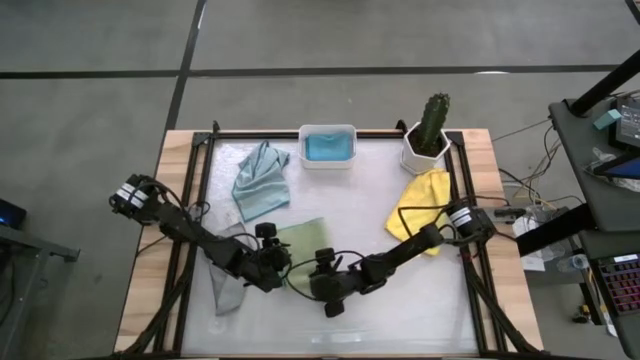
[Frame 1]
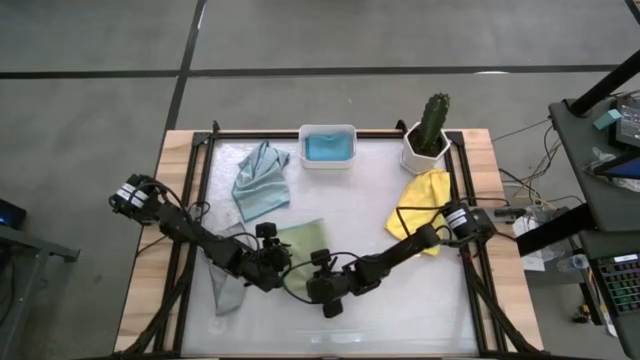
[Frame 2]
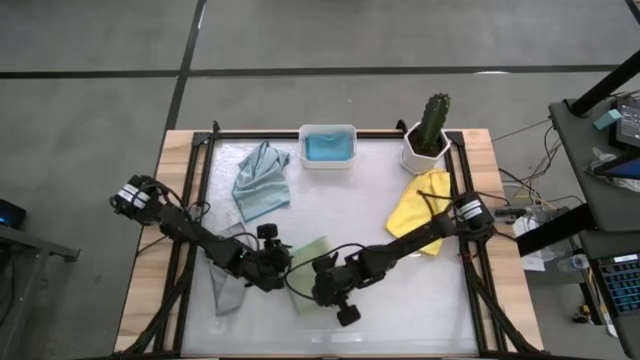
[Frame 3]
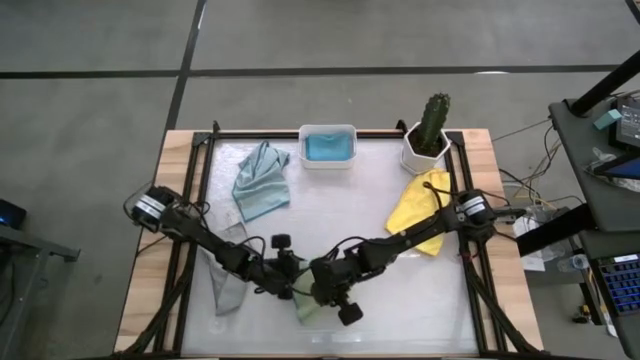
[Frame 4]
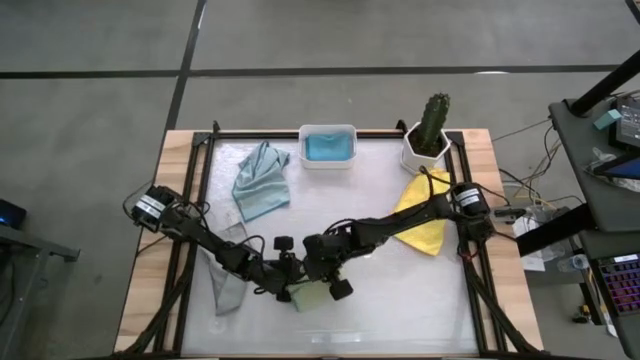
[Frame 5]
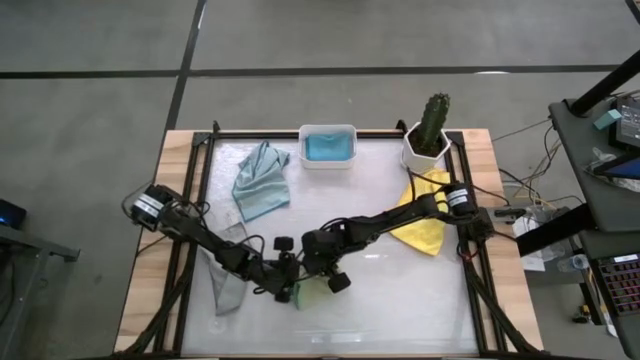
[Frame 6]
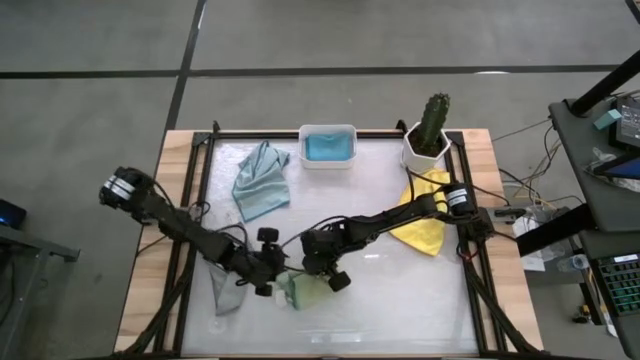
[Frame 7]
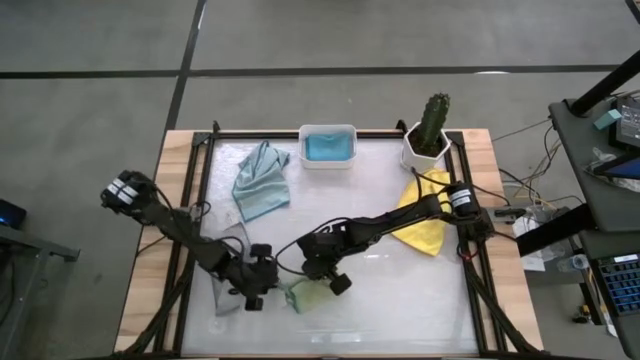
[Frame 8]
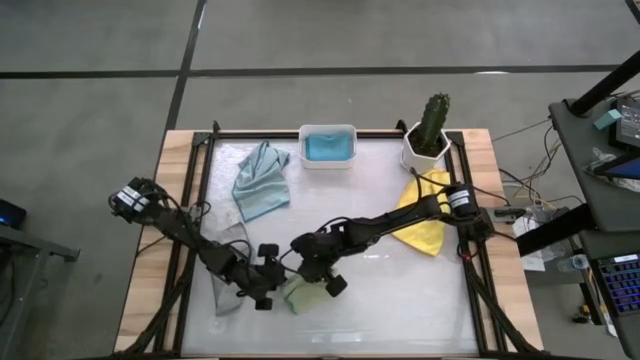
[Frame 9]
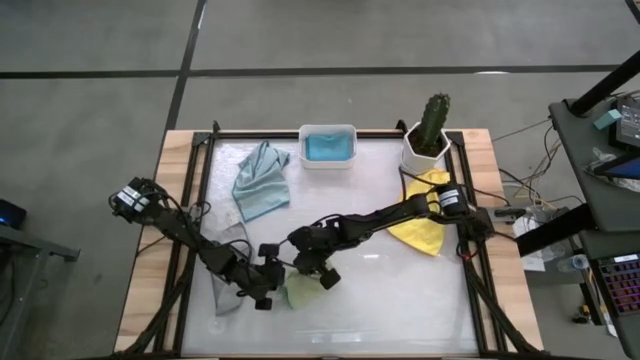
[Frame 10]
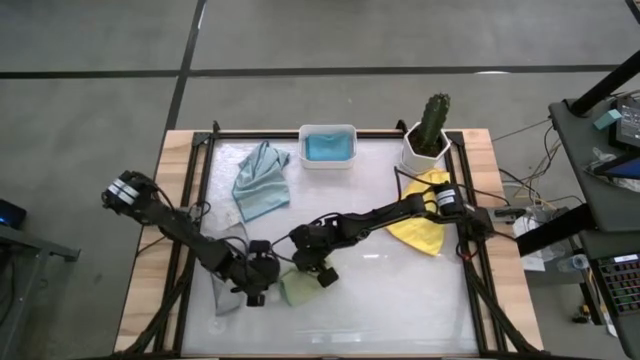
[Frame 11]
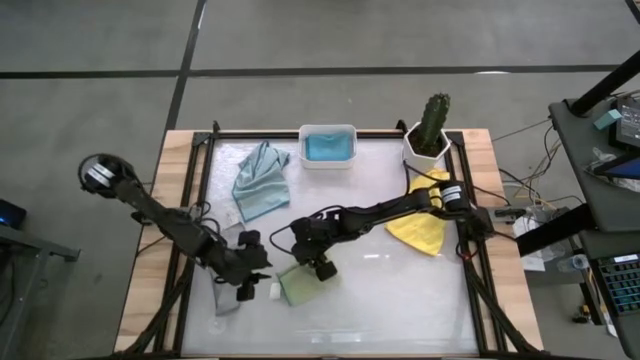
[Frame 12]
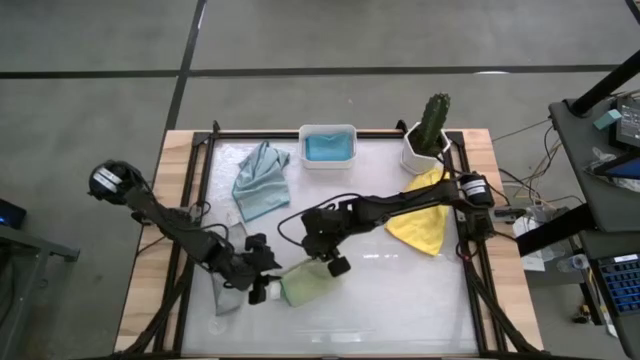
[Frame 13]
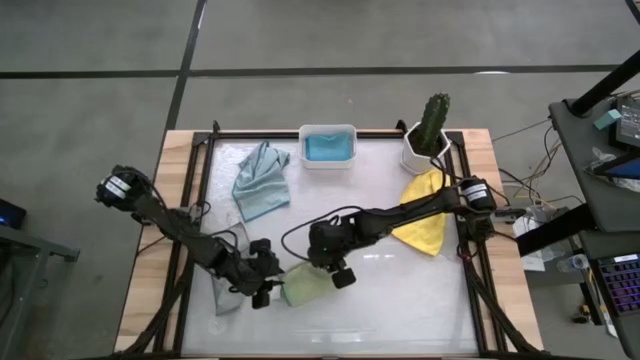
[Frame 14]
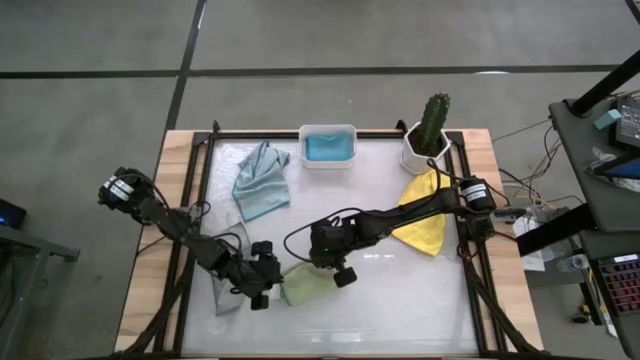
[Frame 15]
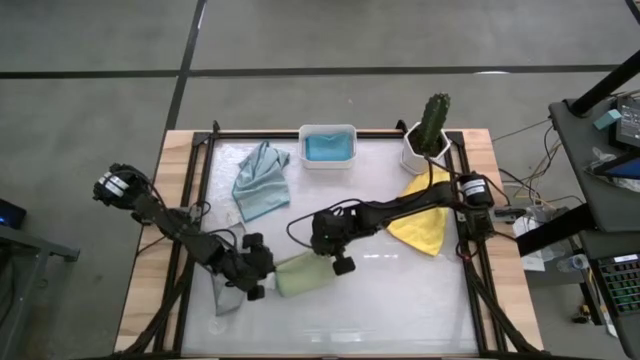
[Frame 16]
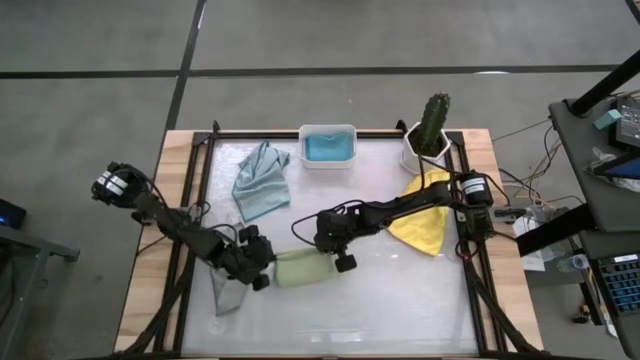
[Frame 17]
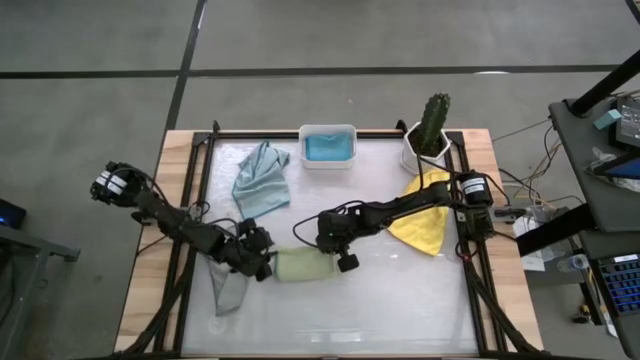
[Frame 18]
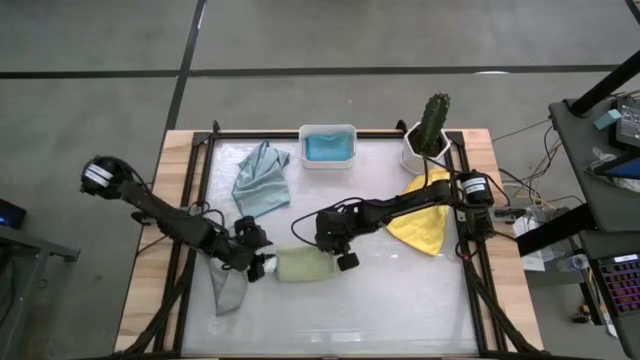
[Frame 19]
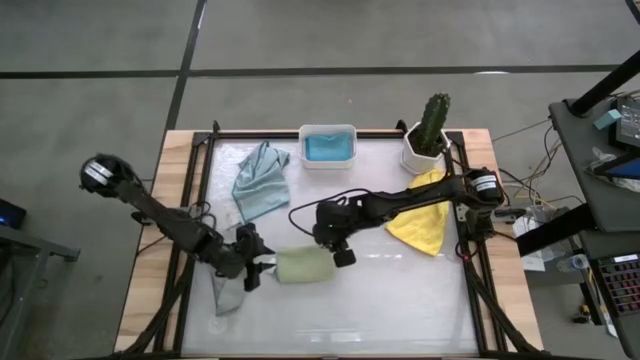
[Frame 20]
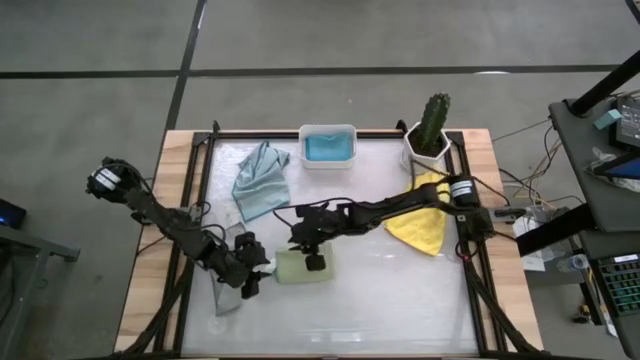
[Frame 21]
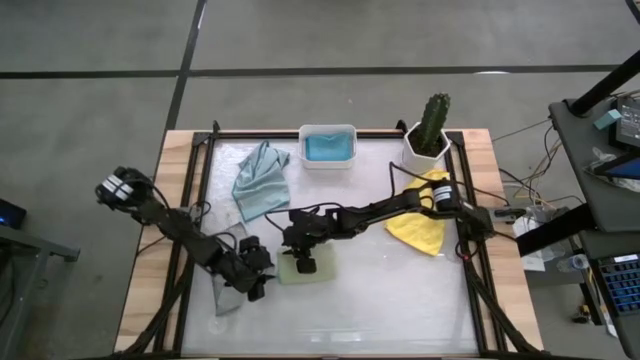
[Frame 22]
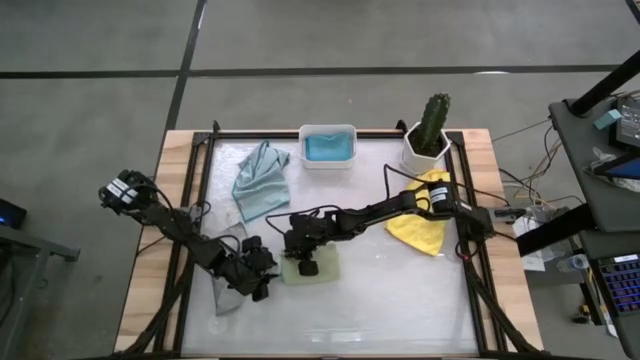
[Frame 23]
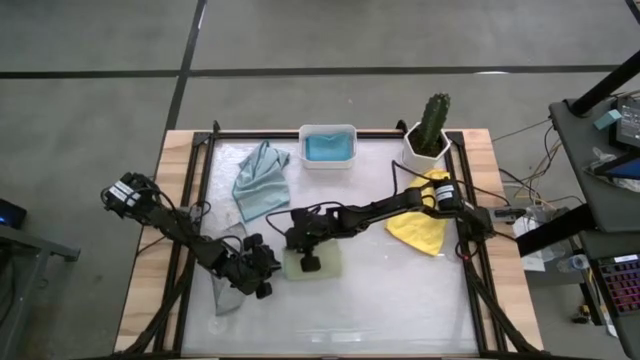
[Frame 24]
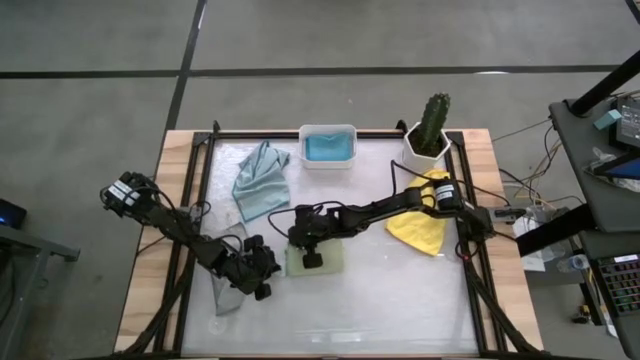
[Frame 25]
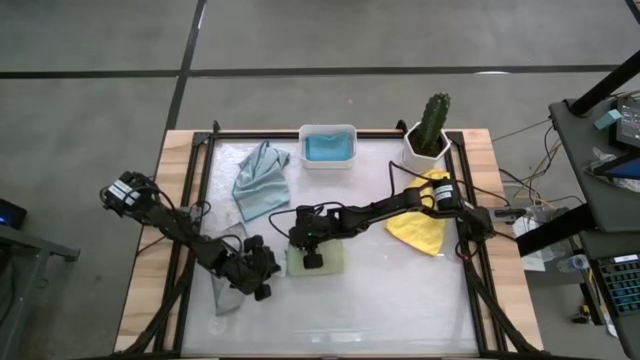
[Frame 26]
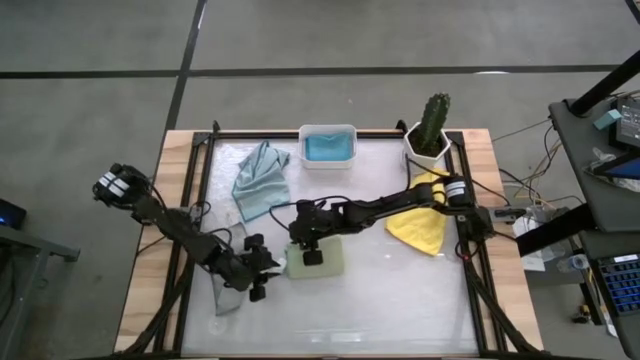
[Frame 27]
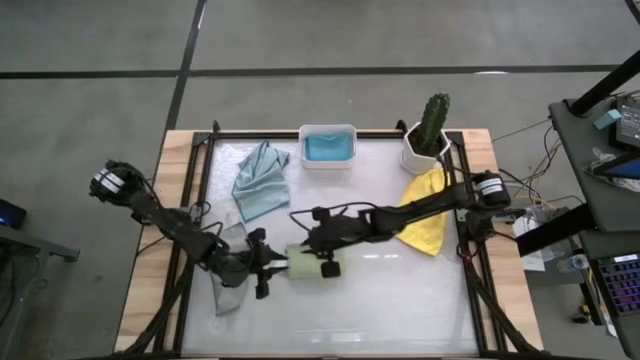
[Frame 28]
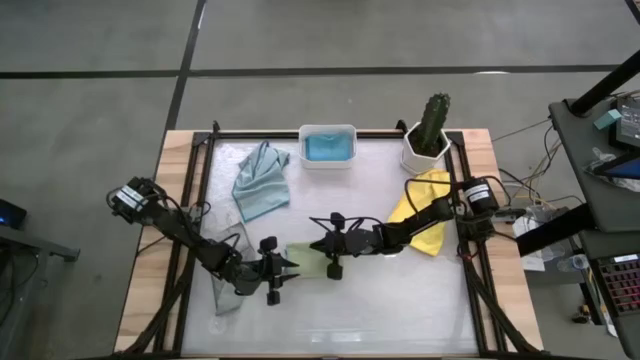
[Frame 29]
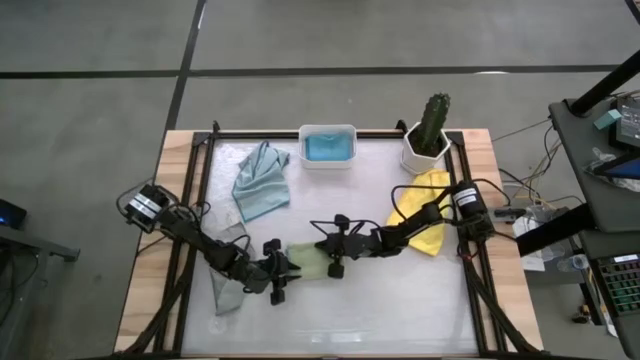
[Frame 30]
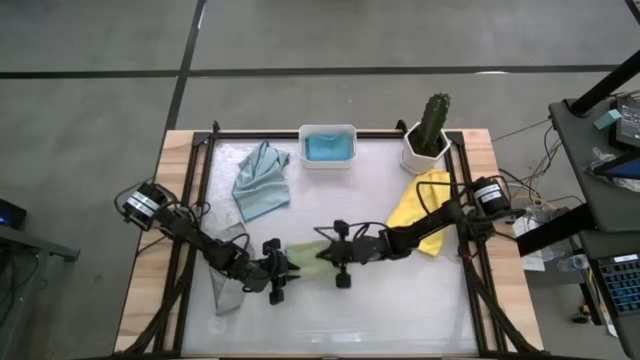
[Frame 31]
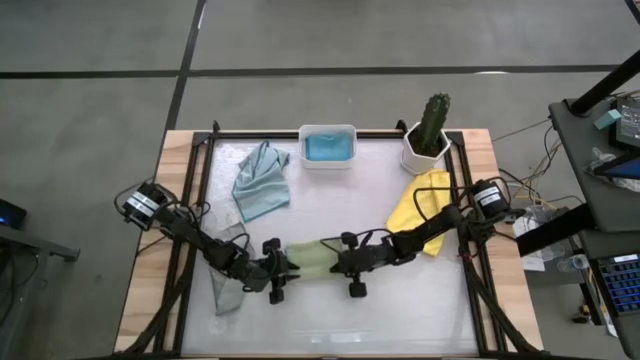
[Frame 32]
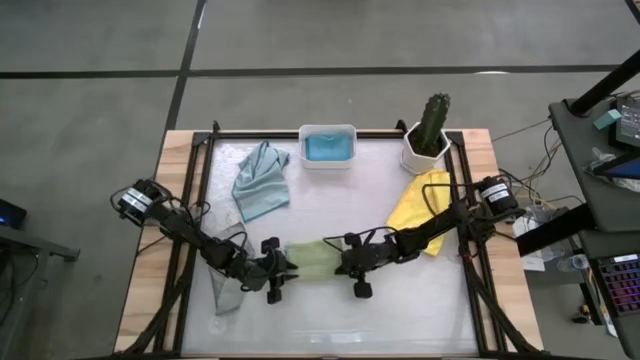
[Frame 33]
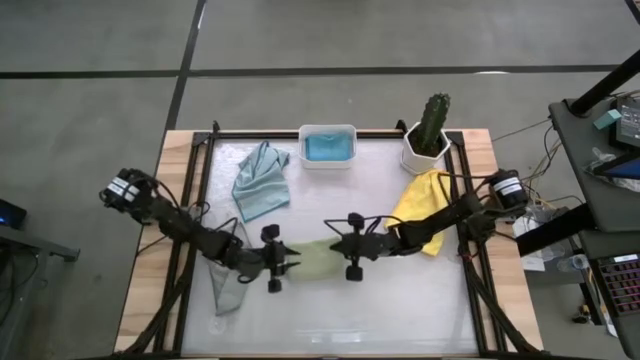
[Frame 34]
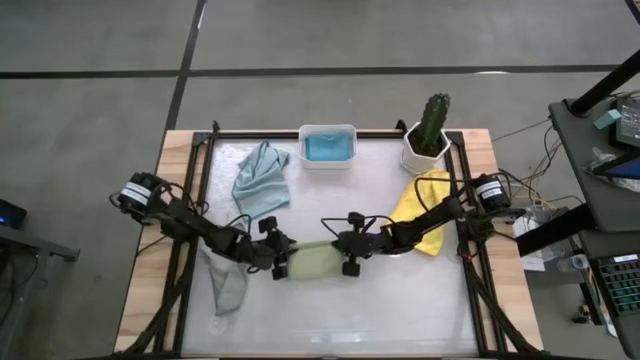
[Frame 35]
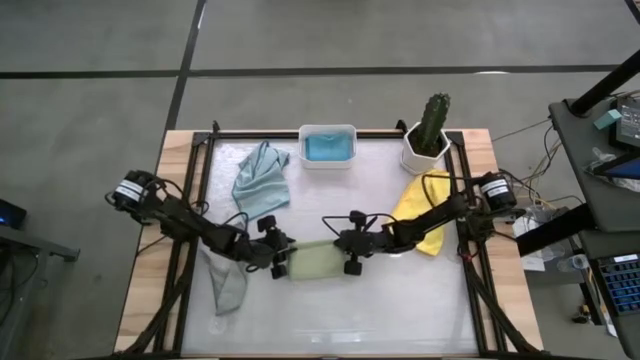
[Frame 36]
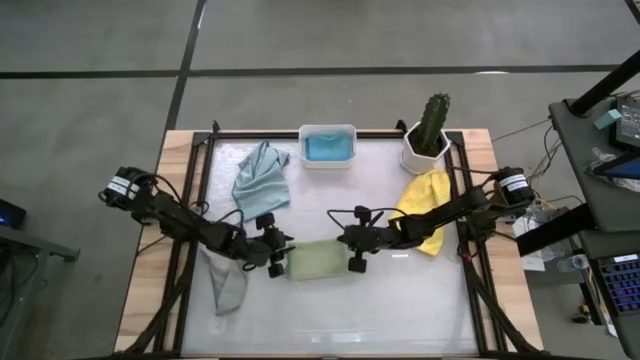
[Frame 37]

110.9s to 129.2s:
Task: Fold microfiber towels
Fold the green cloth
